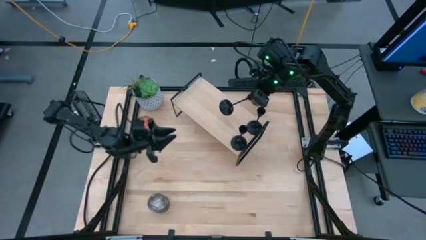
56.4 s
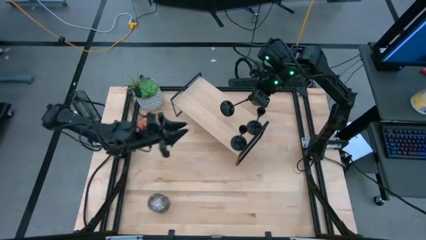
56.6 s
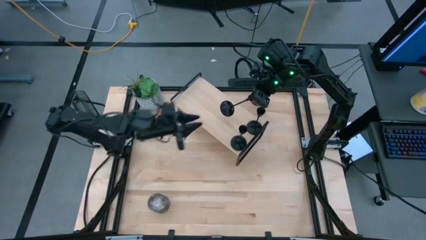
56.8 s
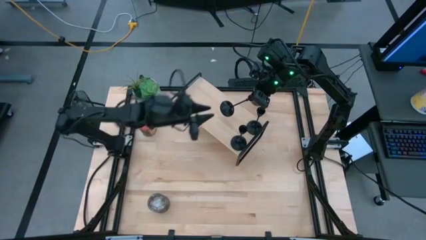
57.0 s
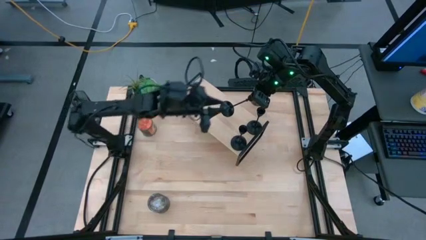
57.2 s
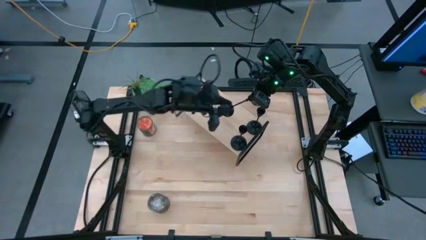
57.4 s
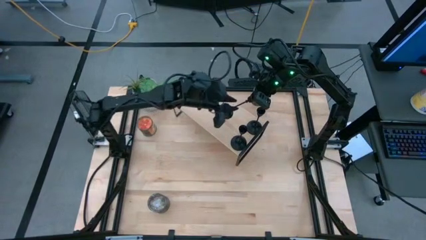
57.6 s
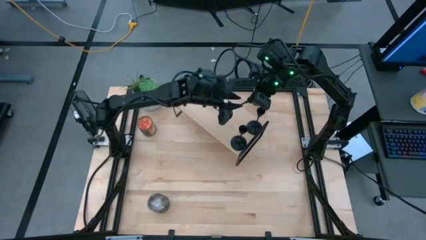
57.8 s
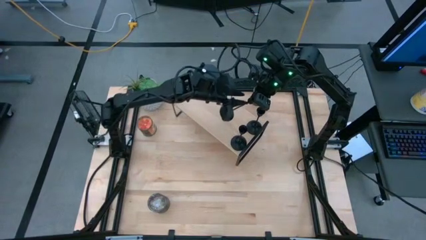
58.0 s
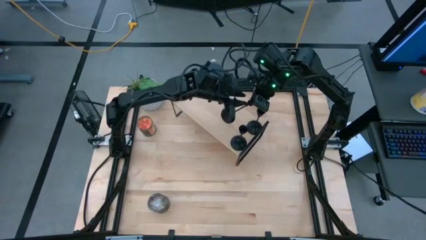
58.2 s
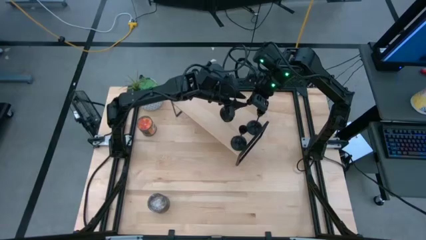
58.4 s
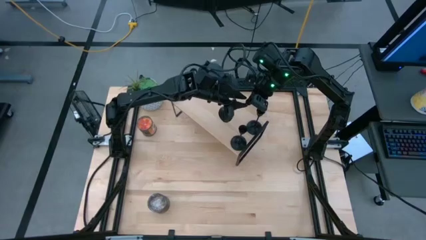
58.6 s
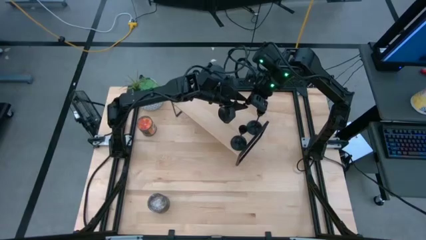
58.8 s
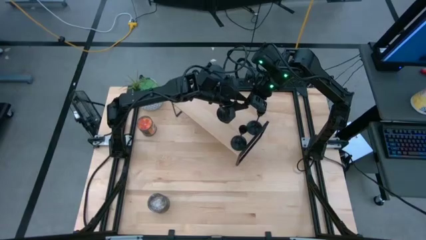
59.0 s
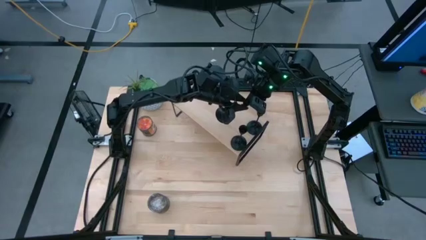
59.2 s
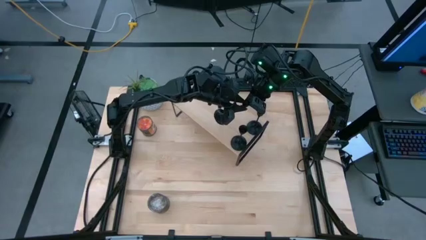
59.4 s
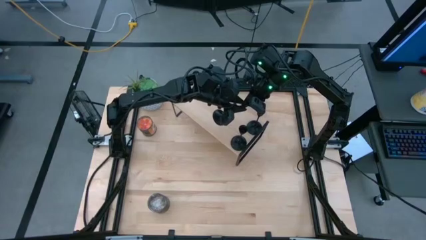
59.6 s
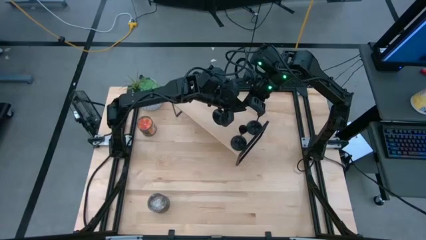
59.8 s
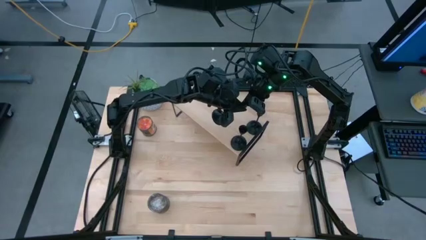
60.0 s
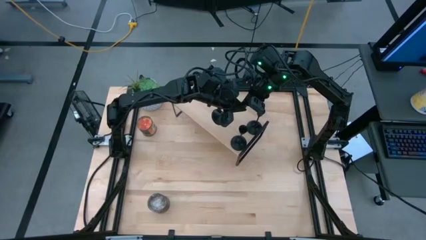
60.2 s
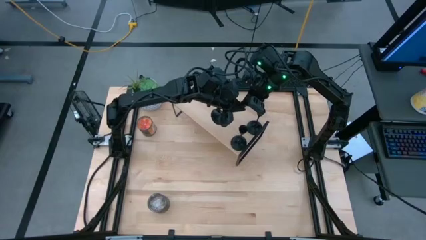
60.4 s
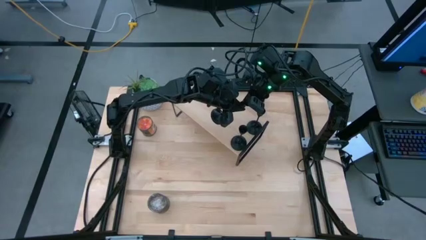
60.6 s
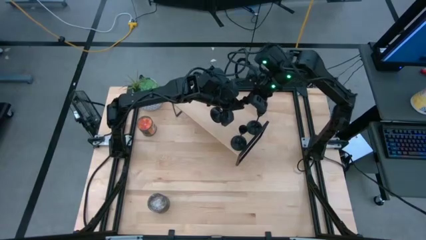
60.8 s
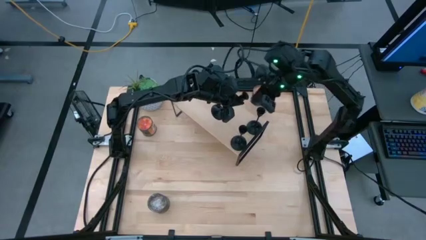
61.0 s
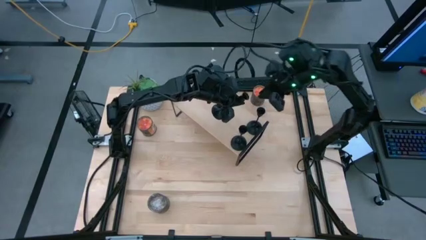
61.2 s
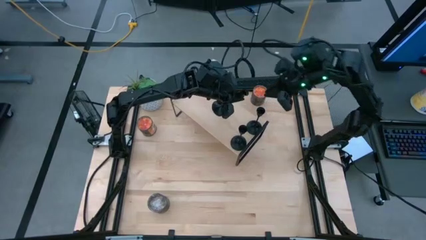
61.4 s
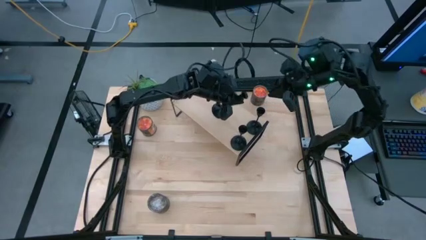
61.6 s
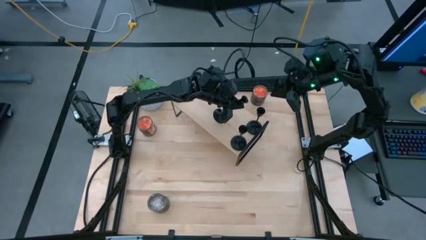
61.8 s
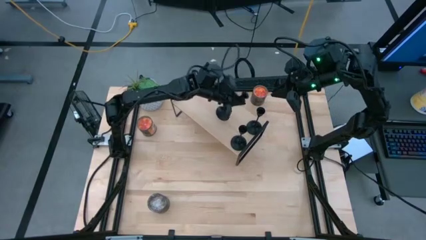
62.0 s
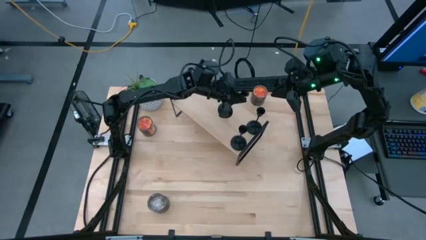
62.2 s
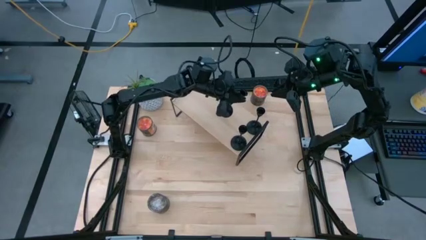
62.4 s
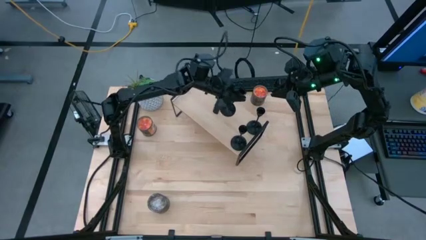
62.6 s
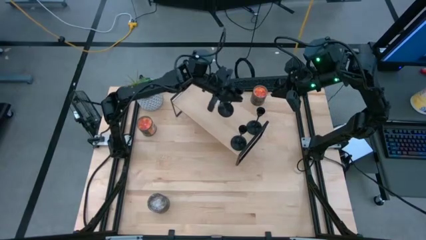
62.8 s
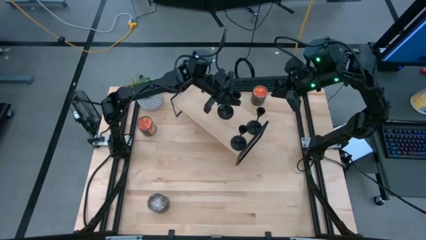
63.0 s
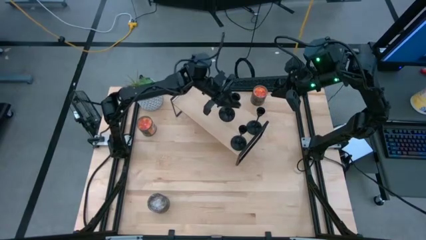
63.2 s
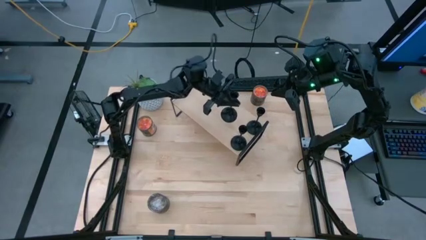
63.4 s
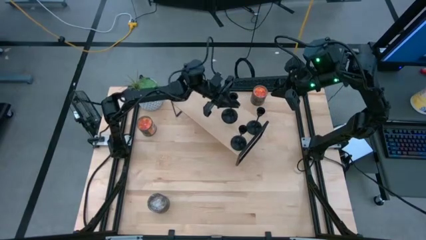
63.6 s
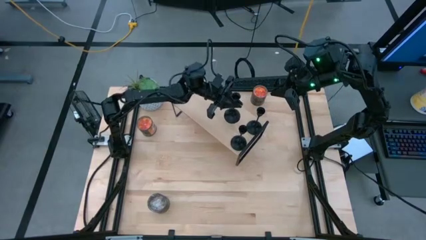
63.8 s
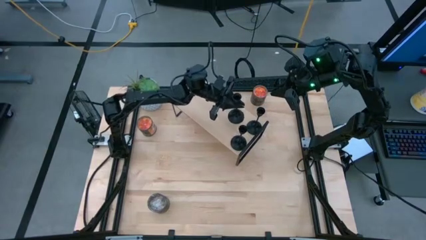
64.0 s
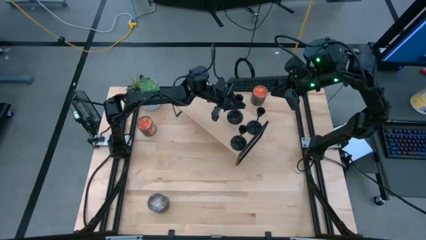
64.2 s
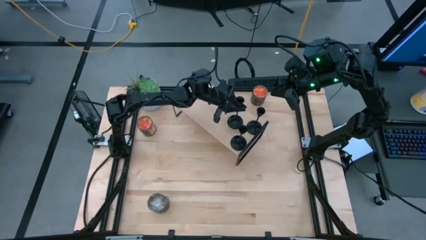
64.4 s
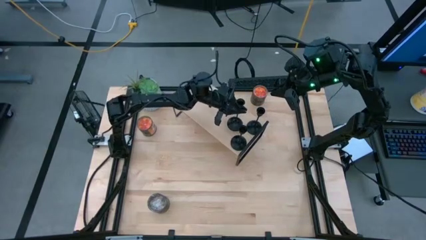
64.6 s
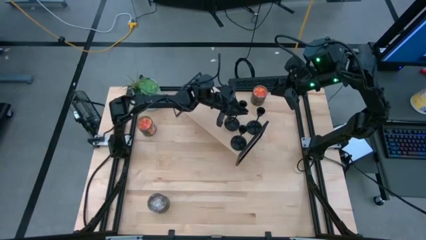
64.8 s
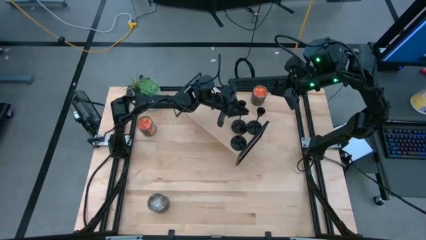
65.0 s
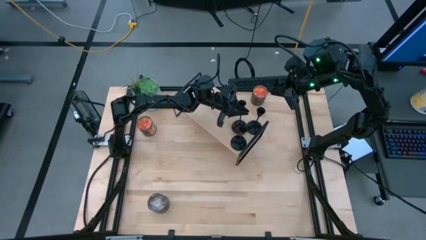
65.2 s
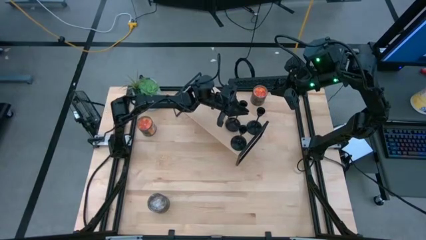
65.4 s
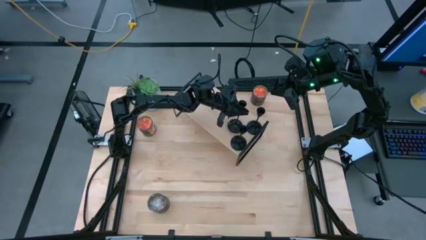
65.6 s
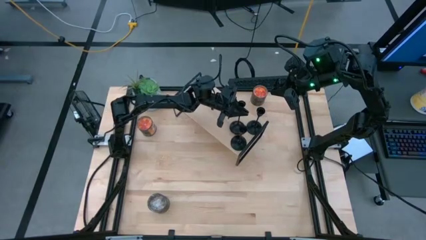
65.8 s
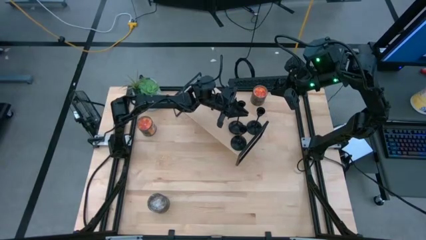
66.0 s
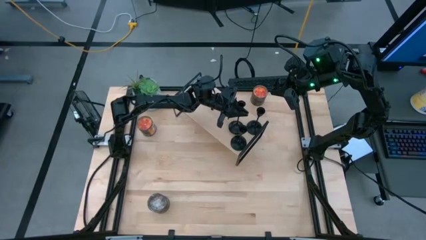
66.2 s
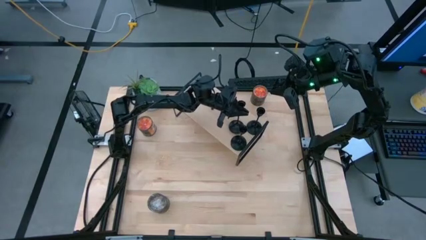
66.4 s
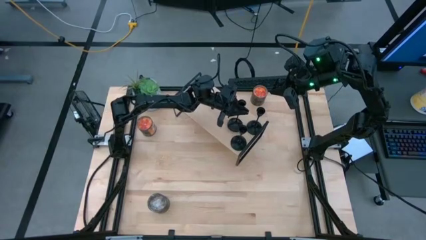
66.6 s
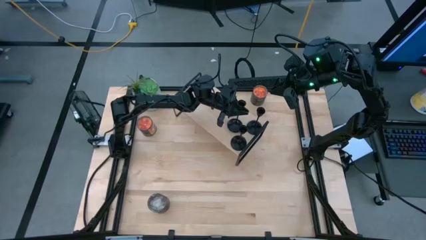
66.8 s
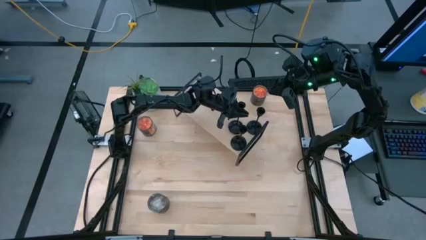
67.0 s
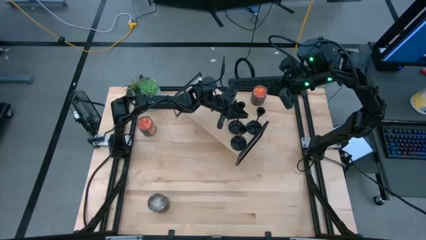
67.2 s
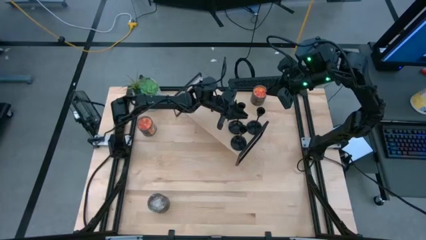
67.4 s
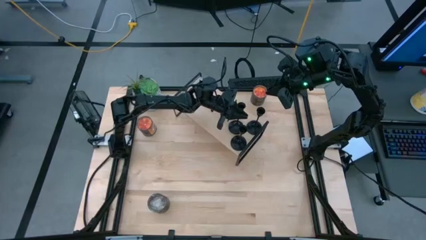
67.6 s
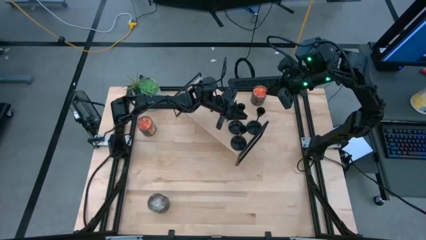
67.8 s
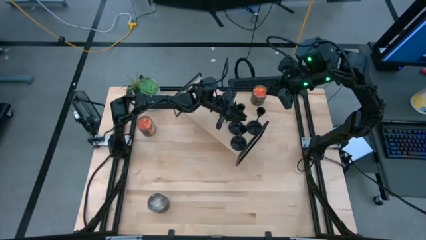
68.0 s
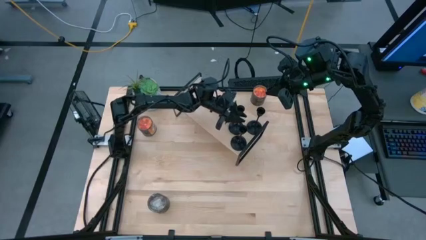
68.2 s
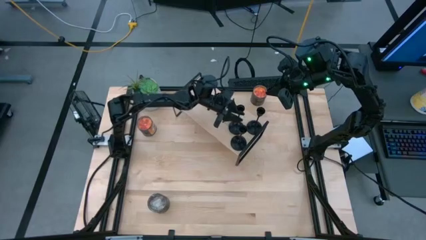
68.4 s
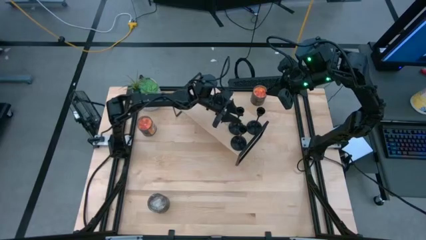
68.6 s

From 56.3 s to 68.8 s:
Task: Pick & Place candle stick holders
Put the black candle holder on the shelf
